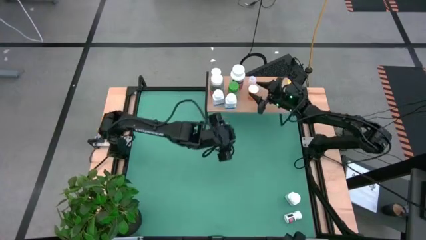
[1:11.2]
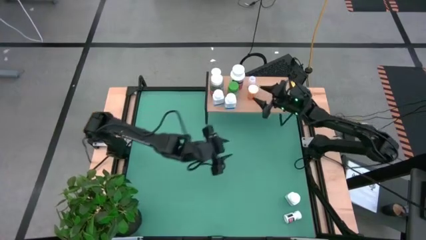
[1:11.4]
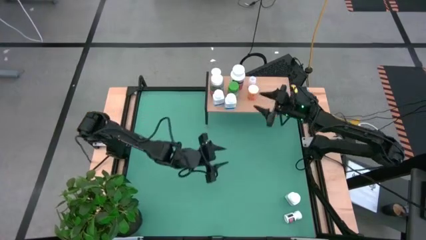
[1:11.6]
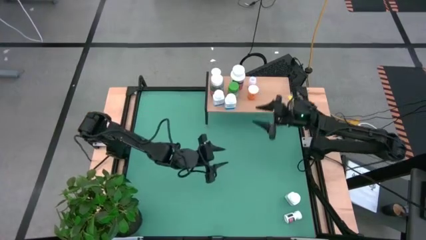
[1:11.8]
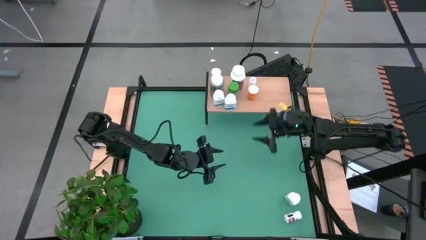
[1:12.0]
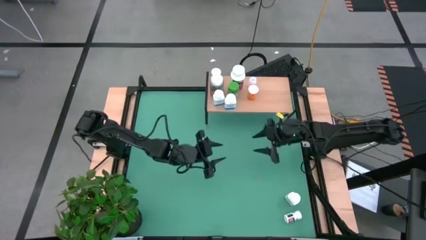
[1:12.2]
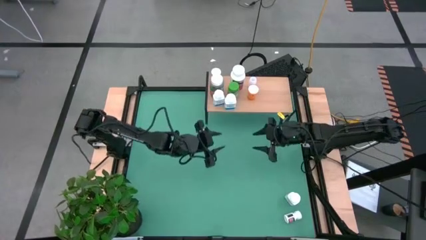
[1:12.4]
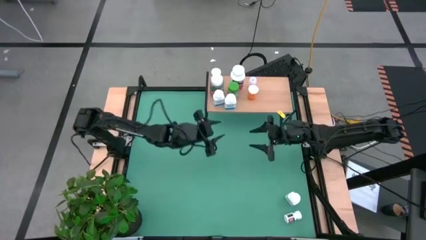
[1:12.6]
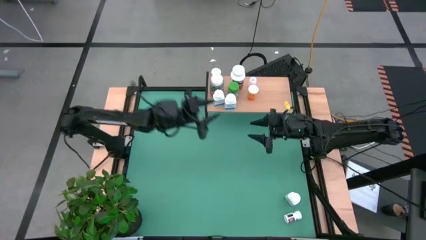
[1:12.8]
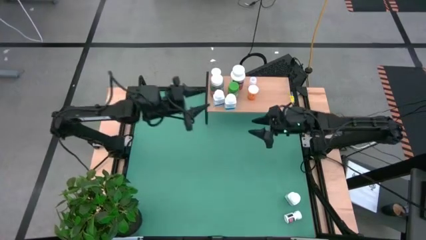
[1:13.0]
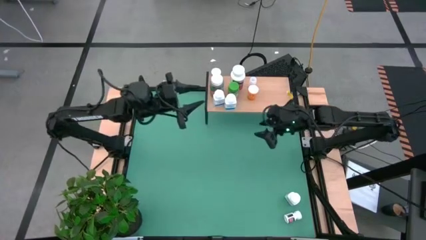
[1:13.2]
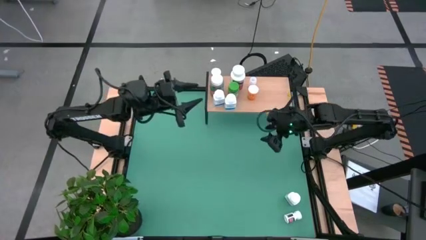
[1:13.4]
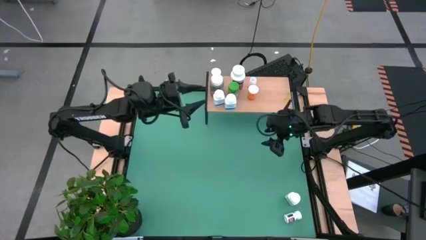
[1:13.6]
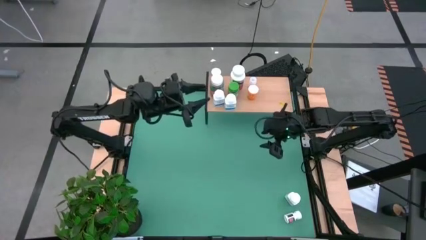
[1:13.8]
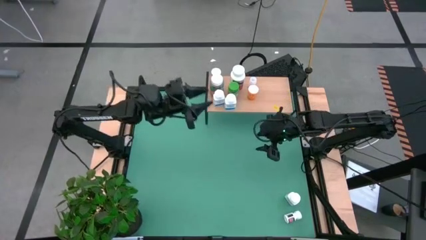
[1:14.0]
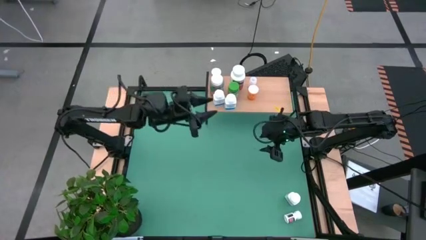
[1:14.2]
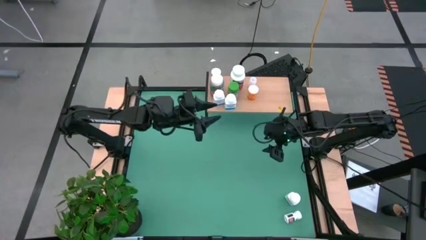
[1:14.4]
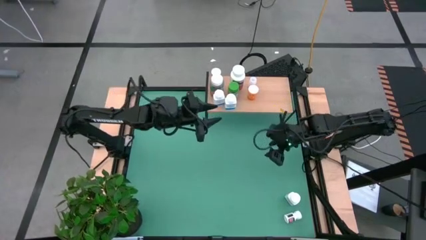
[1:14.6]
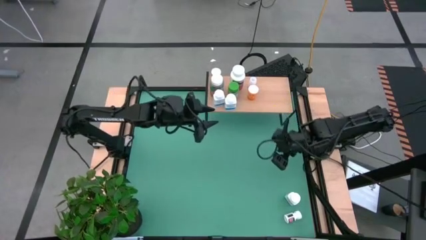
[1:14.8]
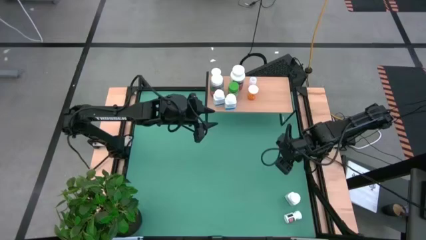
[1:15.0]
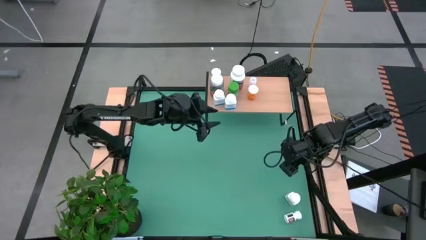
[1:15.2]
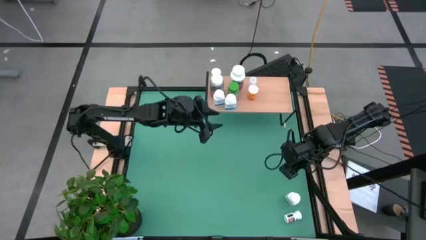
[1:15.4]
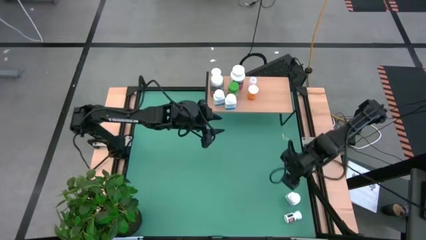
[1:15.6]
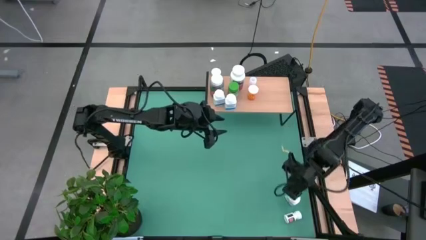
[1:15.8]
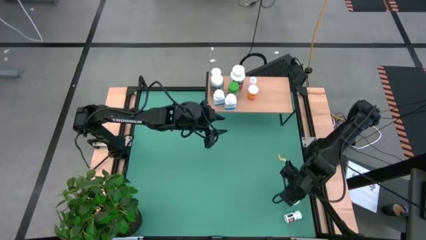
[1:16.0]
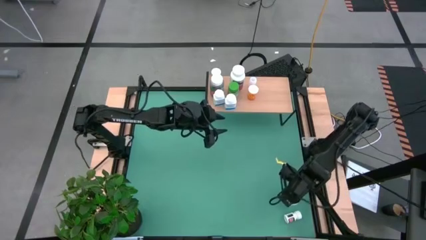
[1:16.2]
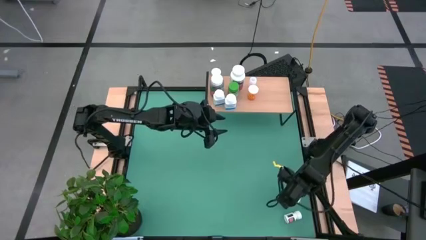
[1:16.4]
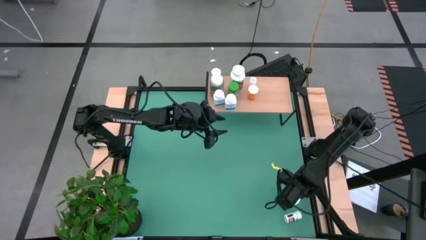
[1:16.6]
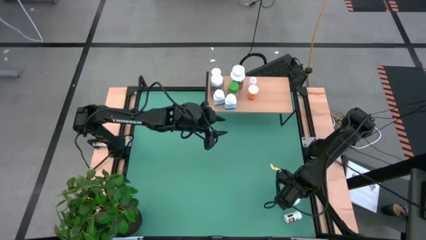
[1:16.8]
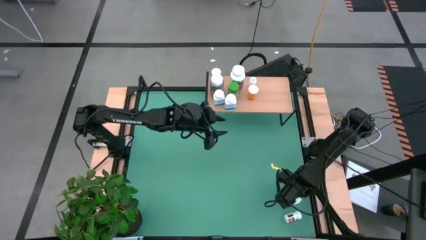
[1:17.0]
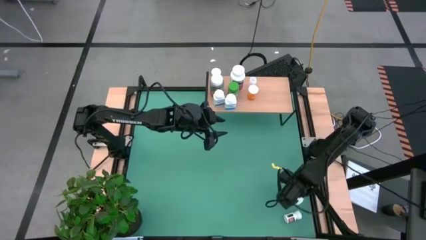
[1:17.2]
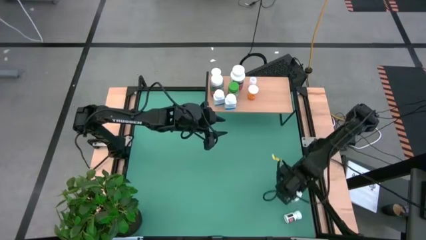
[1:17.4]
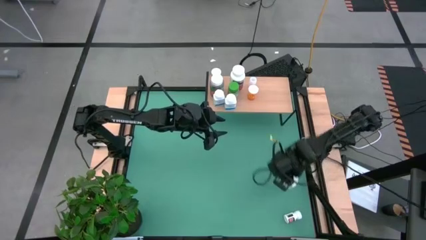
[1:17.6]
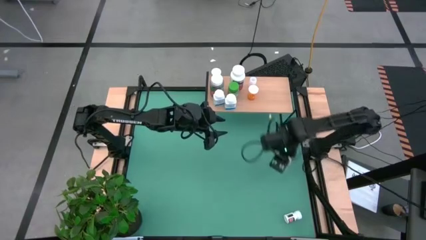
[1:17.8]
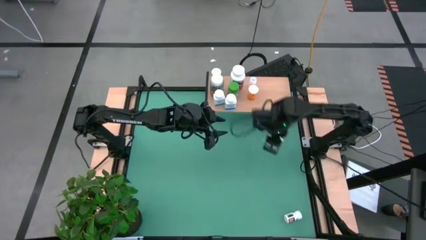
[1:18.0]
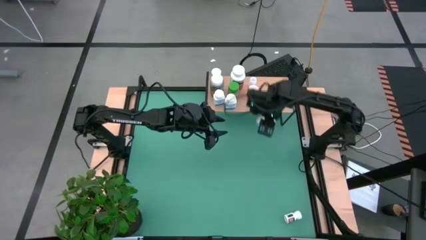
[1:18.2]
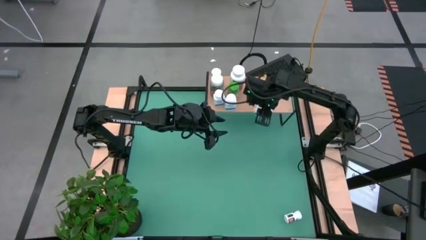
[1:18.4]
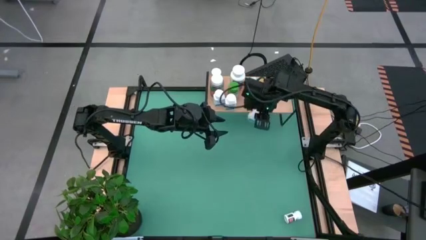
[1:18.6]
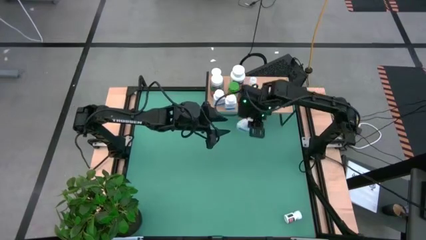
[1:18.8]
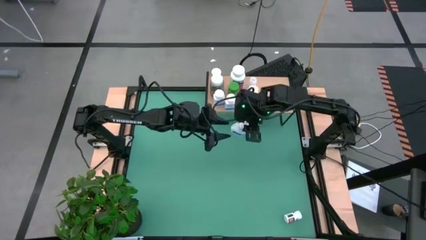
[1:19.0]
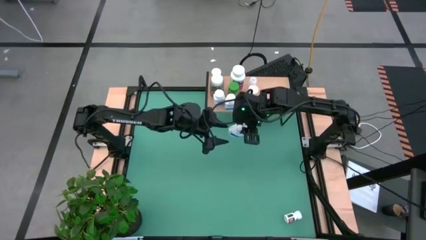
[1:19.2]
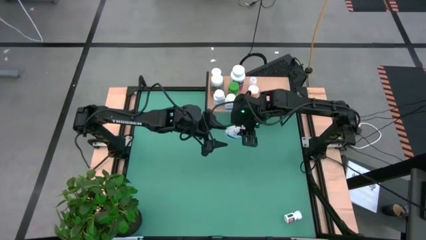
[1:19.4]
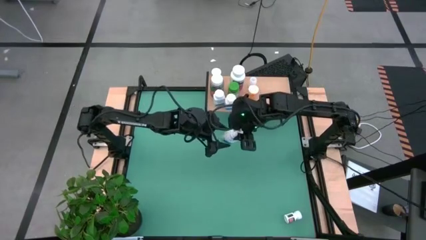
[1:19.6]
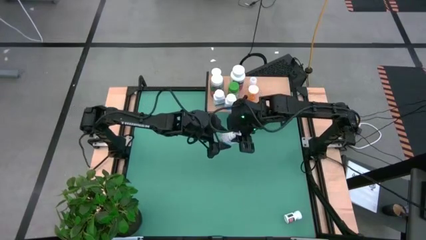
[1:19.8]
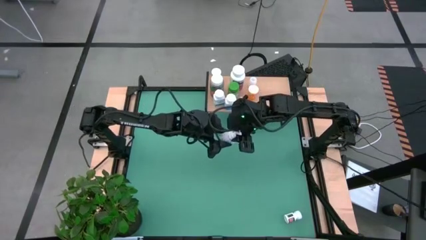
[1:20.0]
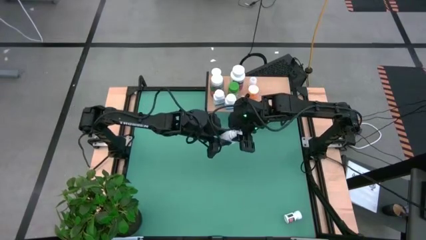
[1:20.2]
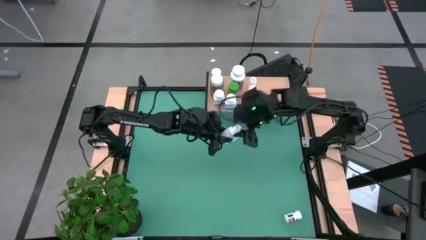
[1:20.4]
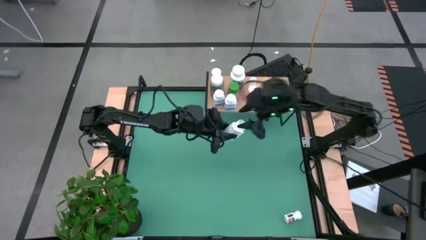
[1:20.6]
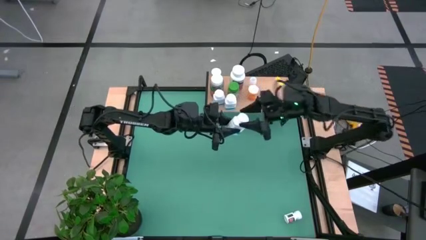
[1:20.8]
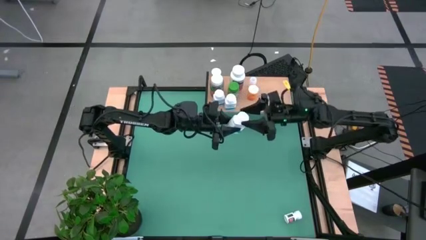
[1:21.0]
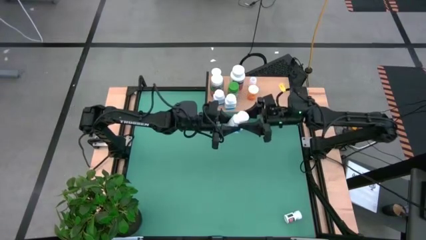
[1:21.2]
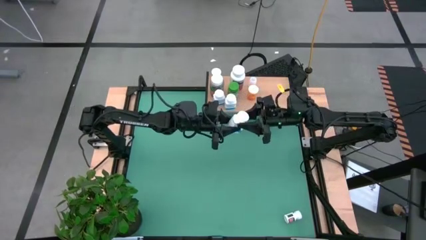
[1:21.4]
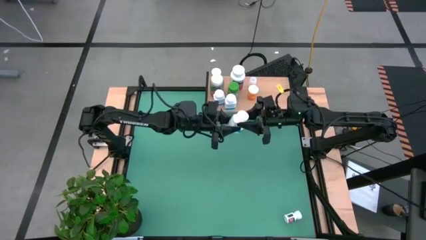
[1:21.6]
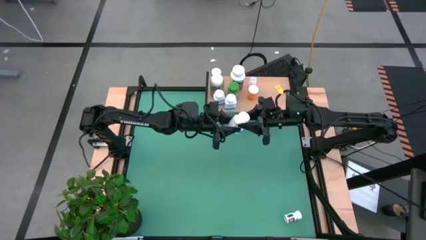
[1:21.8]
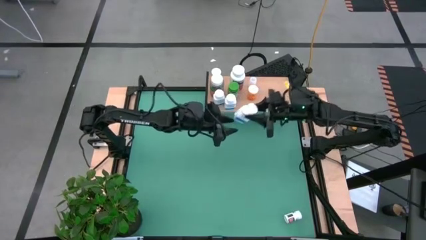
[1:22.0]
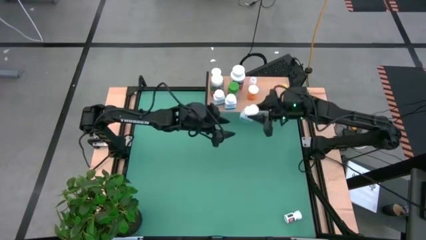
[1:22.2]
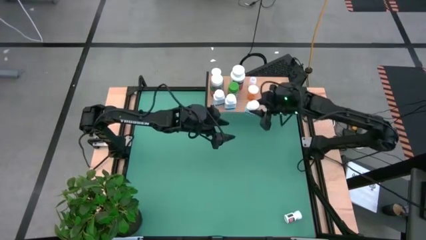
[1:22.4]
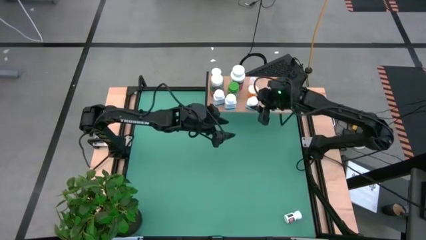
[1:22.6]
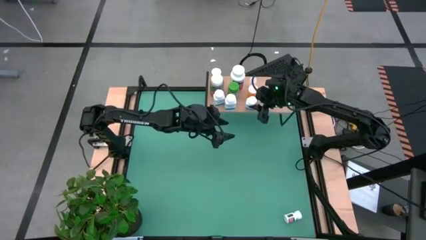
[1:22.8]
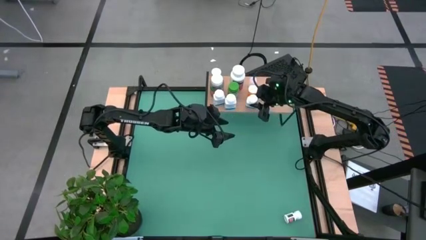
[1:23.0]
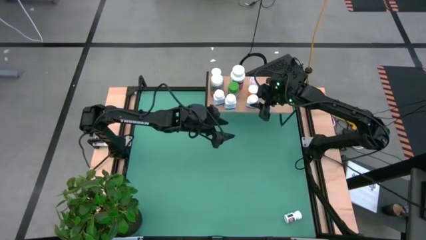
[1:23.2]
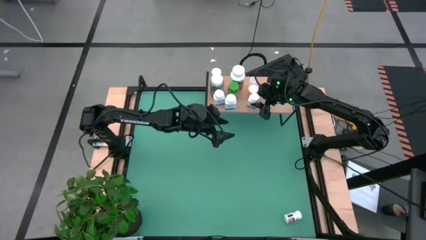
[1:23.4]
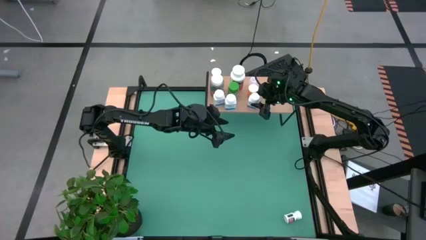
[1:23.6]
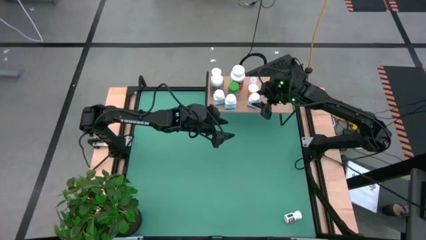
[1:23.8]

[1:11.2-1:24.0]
Task: Pick and place medicine bottles onto shelf by color
Put the blue and white pill bottle on the shelf
